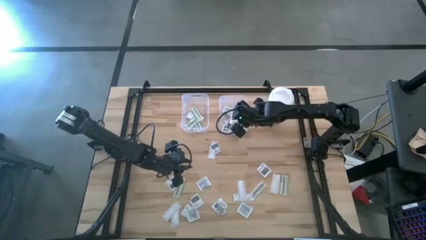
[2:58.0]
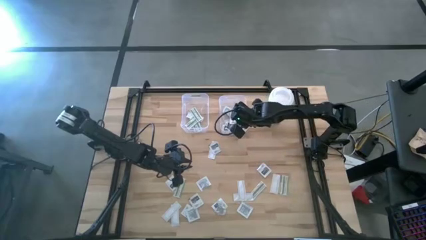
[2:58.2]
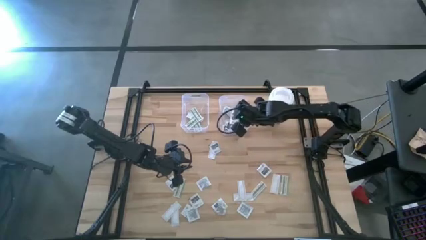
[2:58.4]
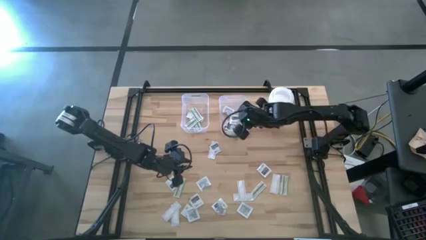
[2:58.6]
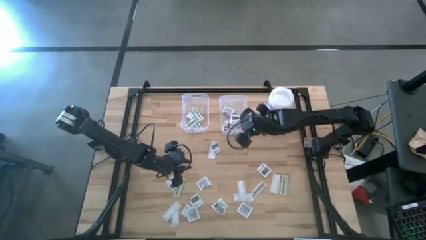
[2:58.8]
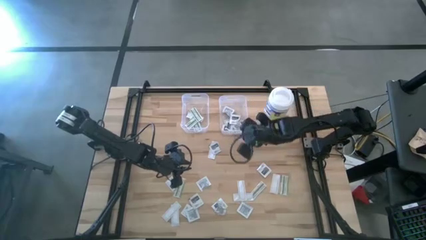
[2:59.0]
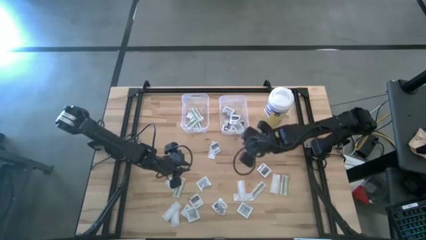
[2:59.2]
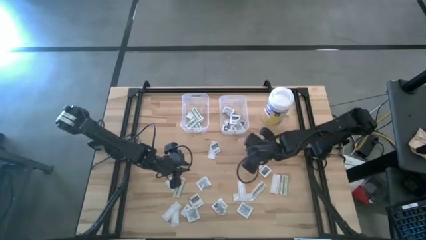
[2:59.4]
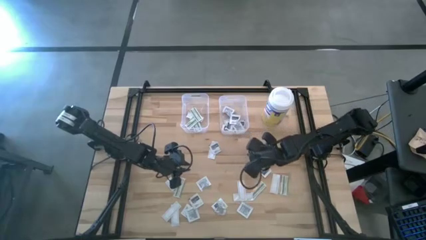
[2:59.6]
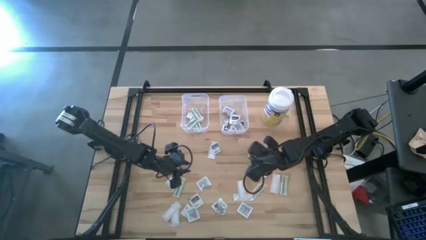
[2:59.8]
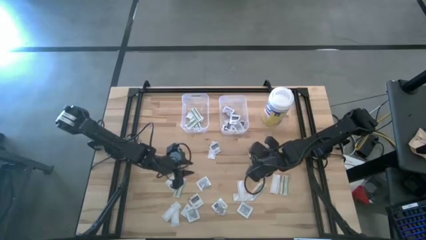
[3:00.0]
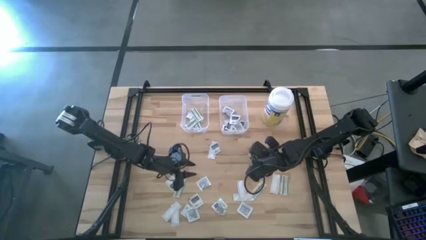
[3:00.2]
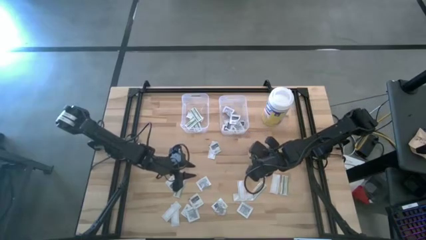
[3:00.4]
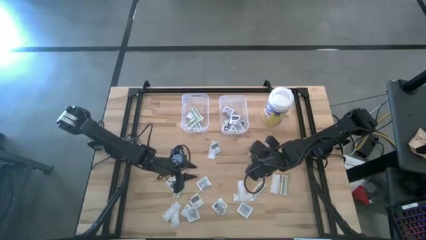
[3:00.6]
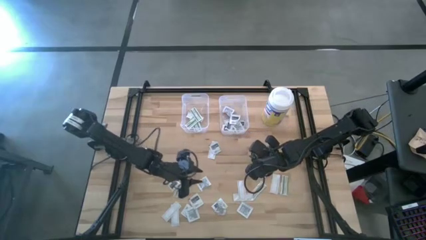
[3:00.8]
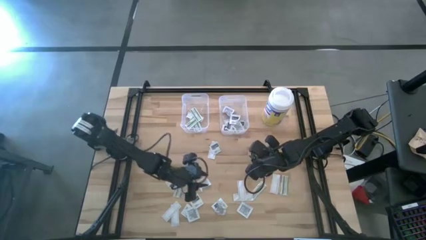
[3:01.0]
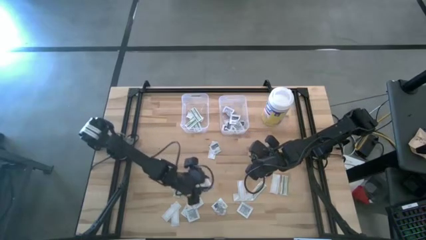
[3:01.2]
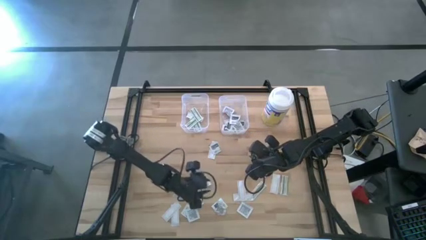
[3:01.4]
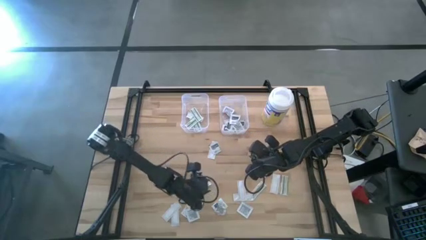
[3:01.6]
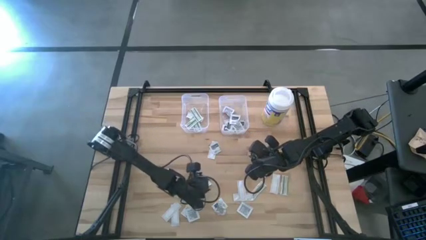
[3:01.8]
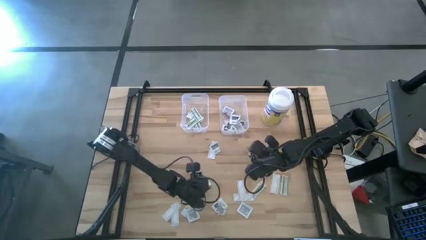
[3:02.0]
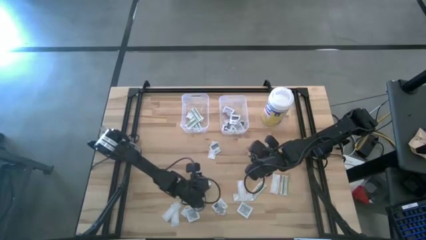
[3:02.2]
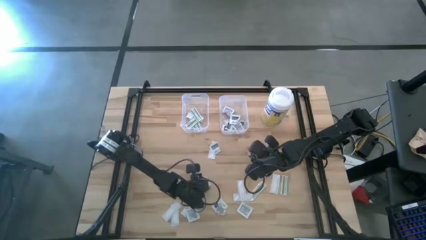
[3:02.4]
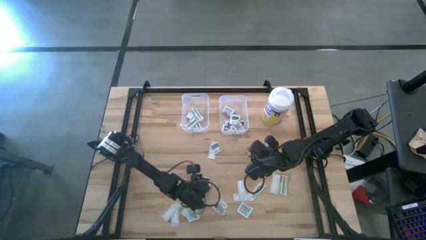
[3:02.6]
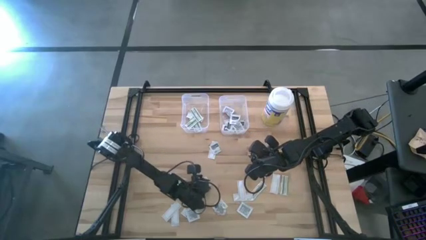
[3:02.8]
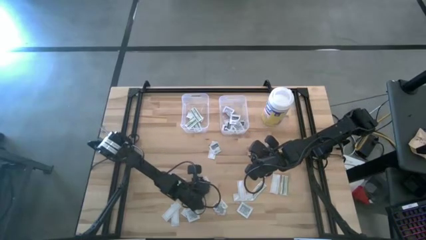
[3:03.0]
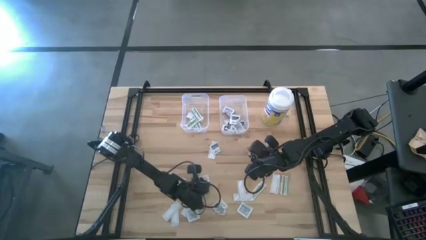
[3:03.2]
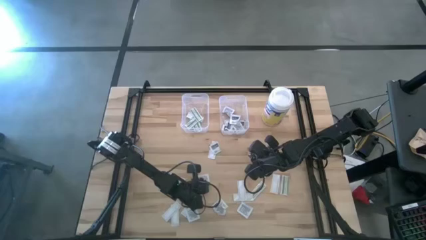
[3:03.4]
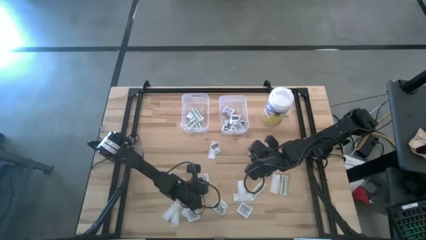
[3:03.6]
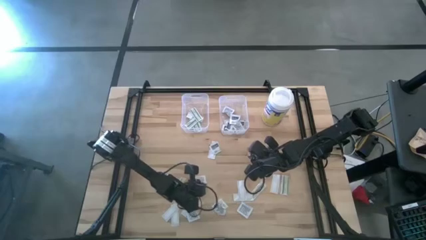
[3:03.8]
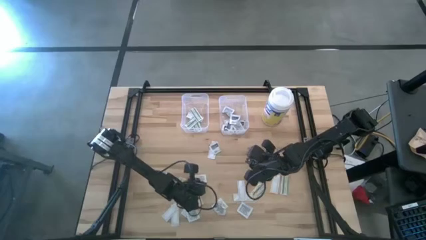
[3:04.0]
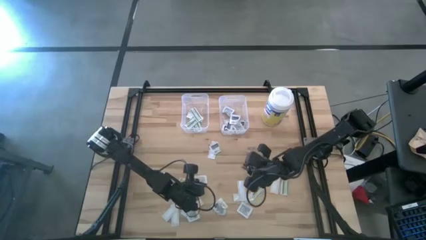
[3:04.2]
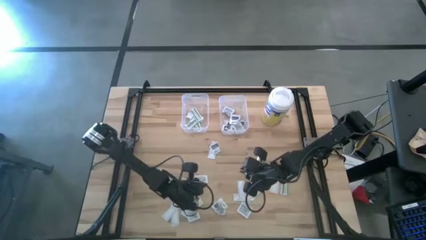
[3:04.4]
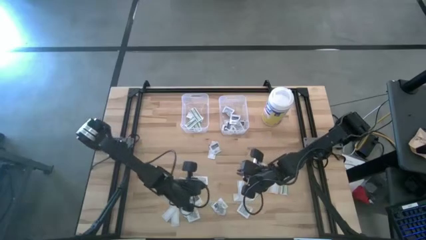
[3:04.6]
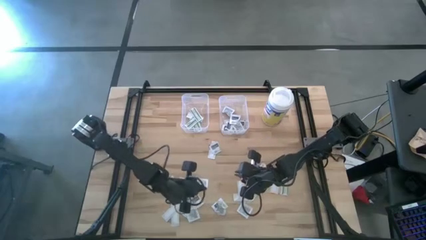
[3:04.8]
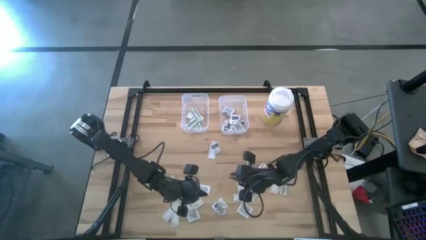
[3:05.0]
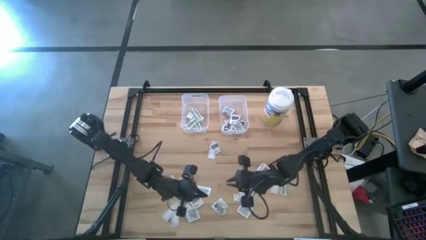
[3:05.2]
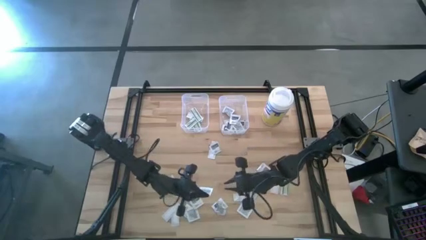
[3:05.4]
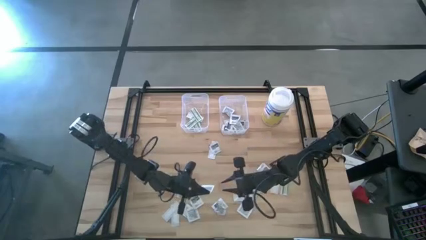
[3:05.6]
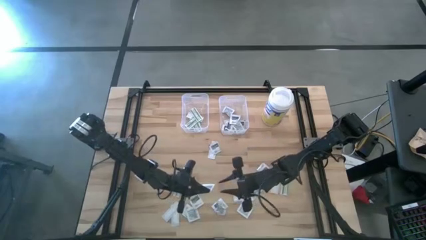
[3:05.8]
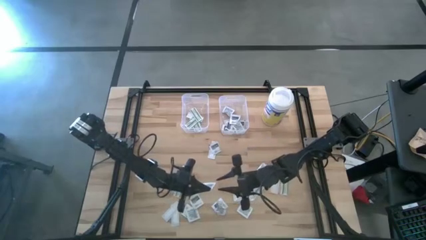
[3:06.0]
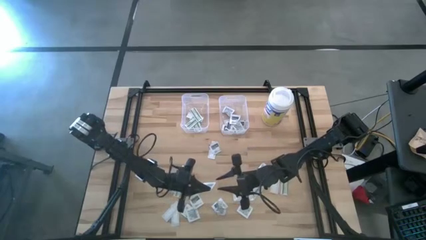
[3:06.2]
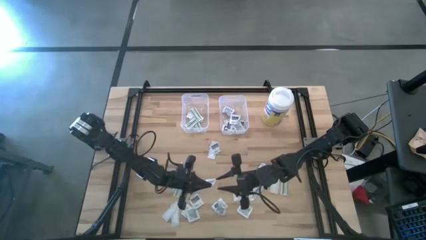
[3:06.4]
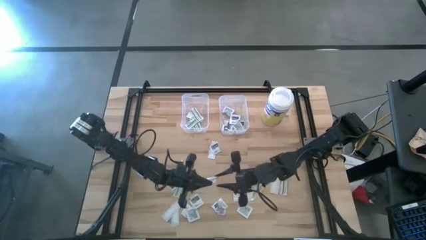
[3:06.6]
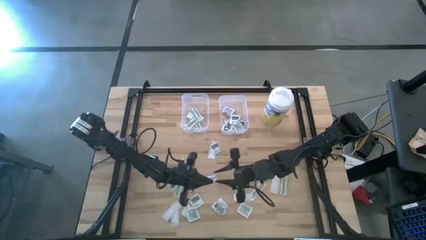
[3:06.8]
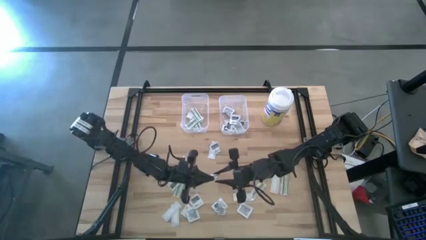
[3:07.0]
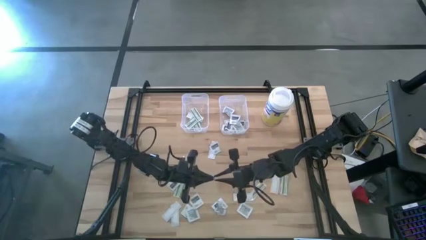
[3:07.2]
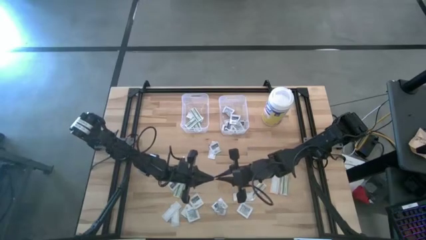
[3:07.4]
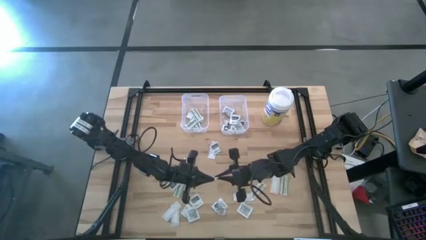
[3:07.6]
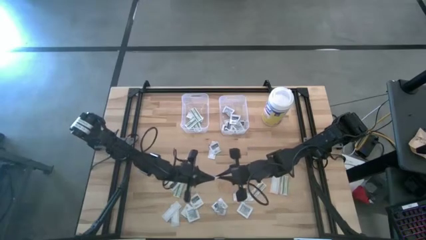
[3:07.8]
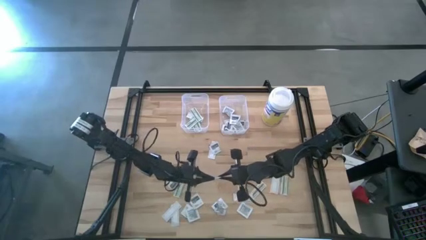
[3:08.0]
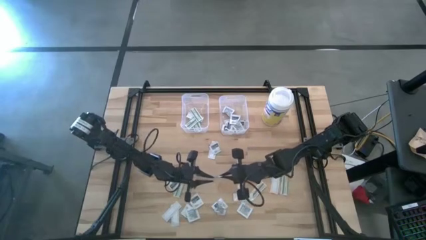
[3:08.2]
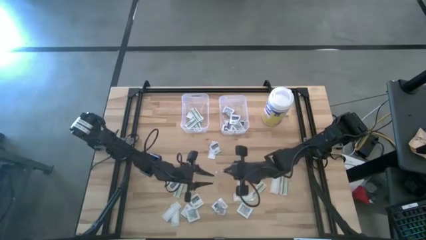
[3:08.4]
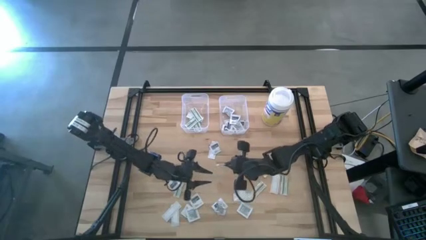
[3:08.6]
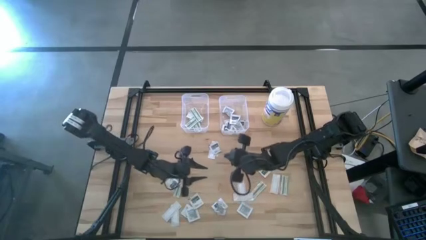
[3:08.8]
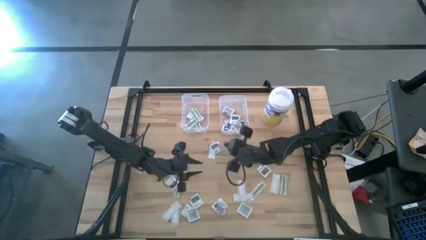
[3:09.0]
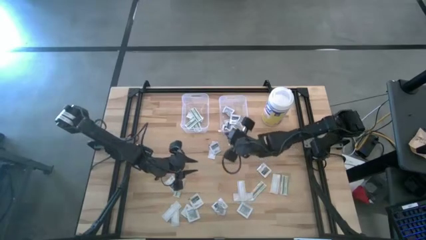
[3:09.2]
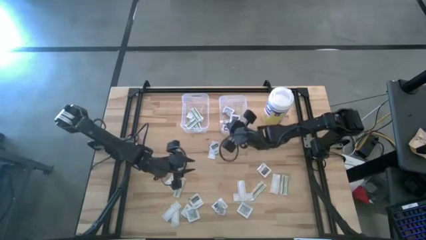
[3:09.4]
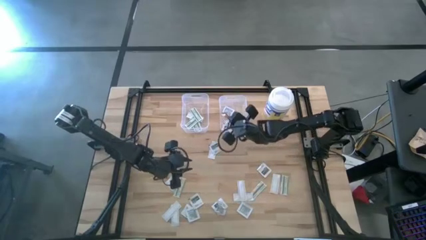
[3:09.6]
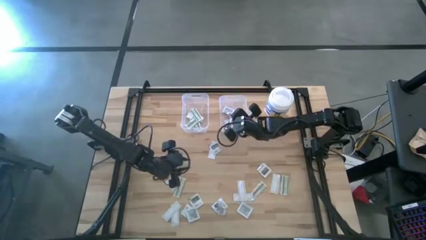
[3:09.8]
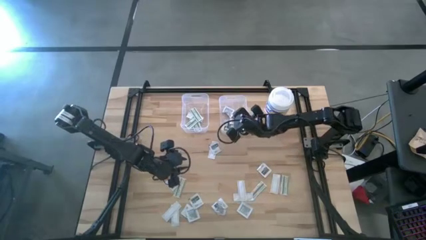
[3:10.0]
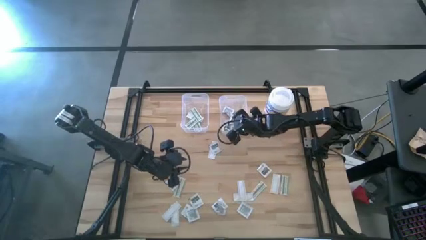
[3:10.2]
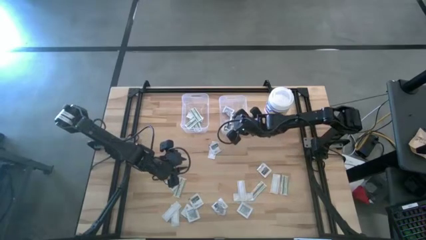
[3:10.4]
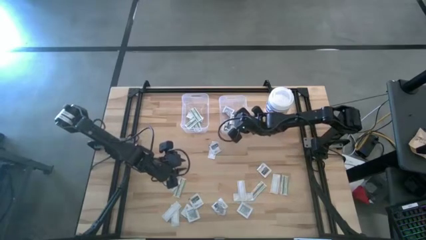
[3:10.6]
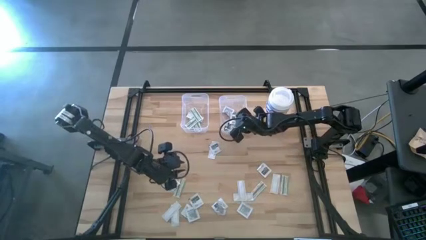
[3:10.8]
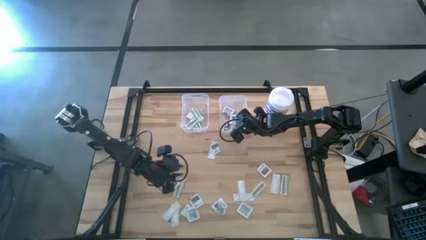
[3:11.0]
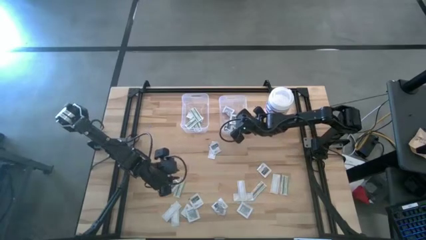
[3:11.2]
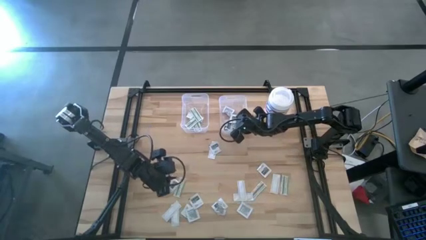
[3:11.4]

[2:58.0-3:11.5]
Task: Pick & Place First Aid Supplies
Put the gray towelette pack into the right transparent bin

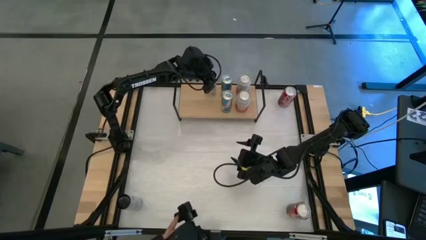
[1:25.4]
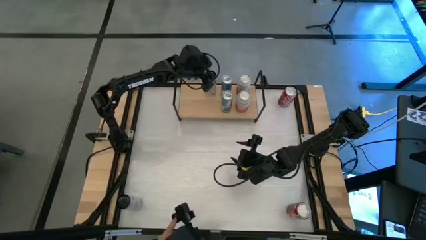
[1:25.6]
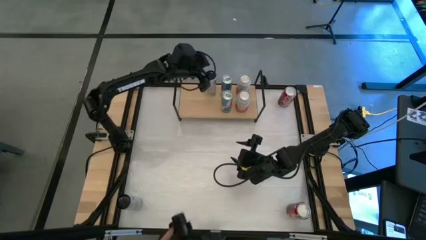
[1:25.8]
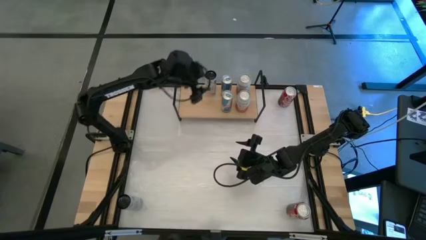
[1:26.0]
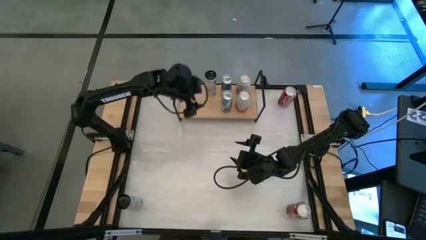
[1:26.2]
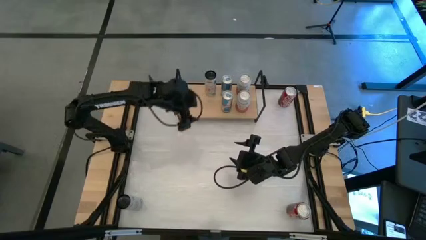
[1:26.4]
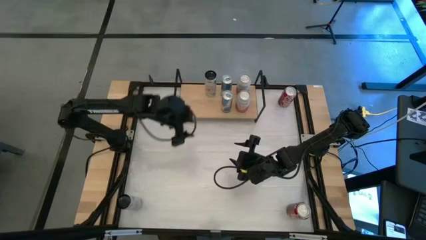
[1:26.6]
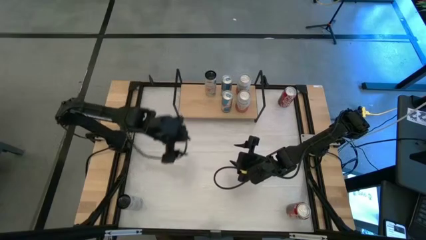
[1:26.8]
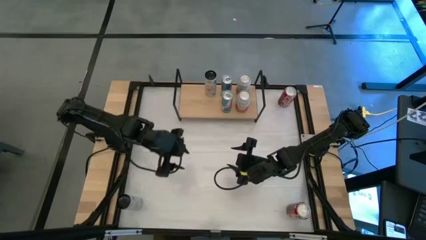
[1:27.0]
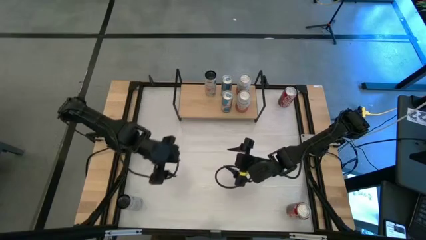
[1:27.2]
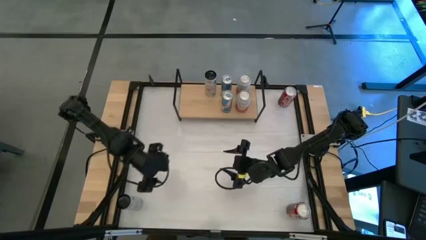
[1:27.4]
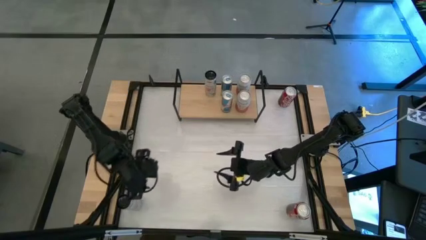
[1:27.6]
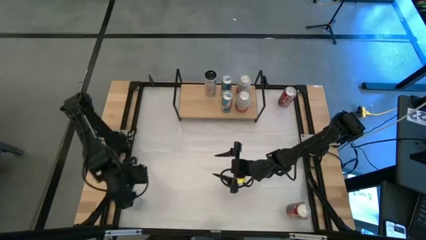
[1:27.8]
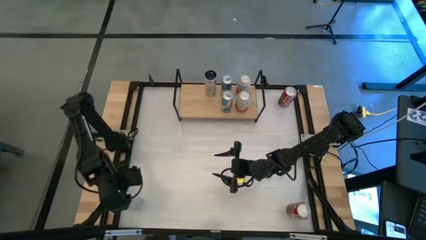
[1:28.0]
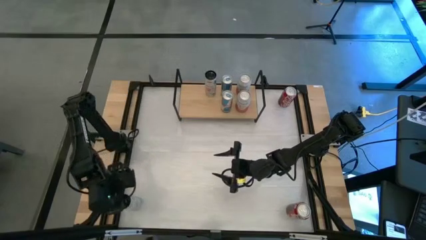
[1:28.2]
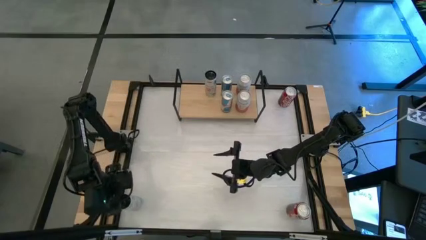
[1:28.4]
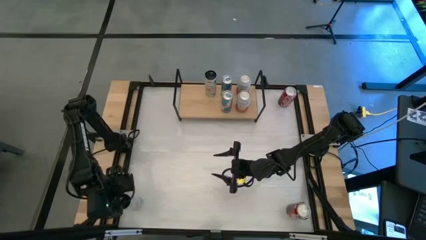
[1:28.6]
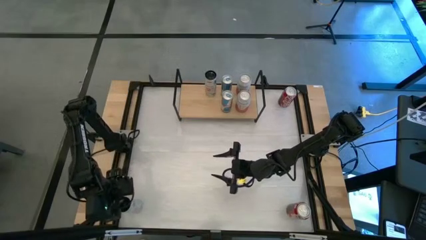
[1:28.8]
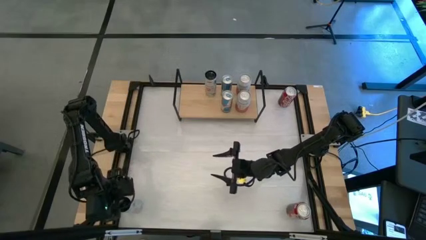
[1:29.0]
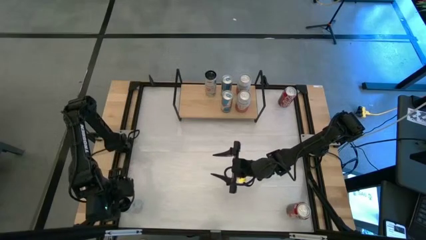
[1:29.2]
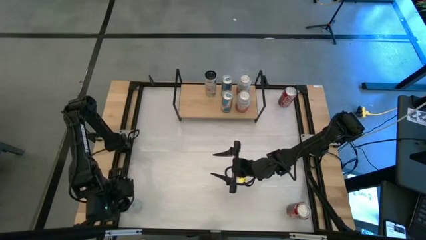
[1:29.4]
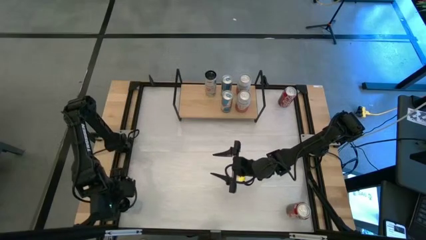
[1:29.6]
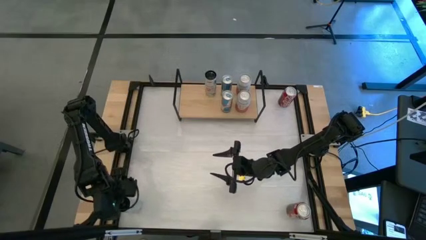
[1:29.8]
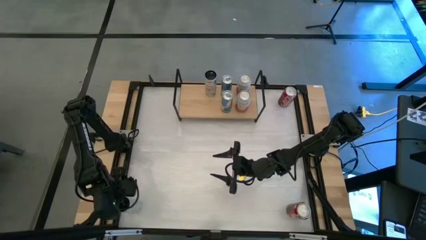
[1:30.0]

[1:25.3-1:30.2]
Task: Place canned beverage on shelf
Move the white soda can to the center of the table
